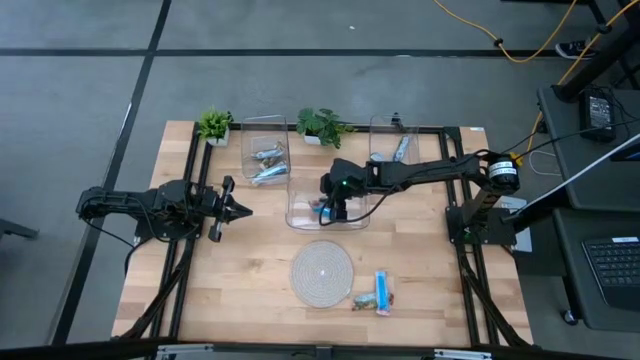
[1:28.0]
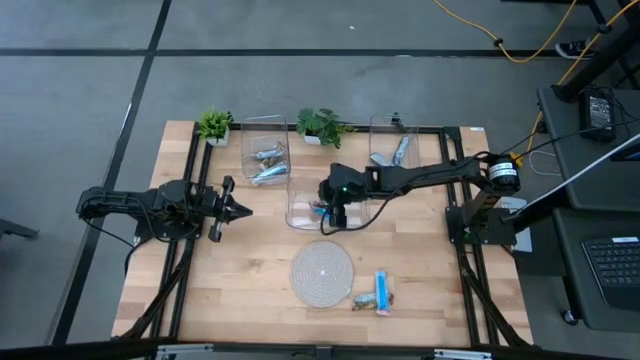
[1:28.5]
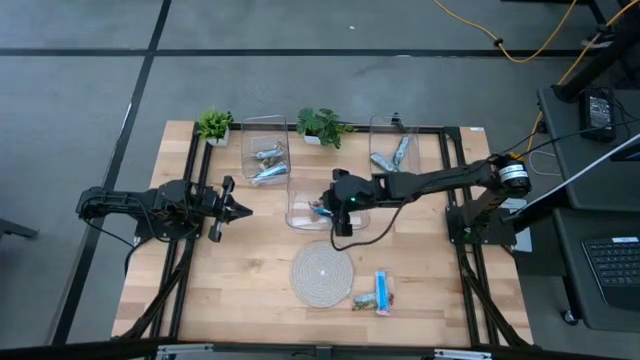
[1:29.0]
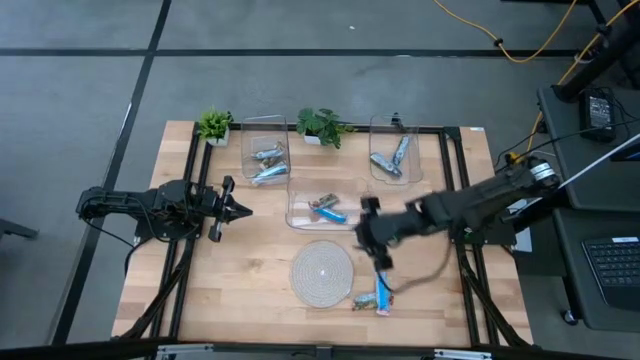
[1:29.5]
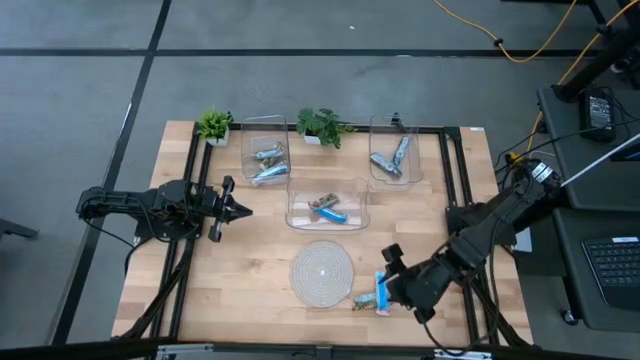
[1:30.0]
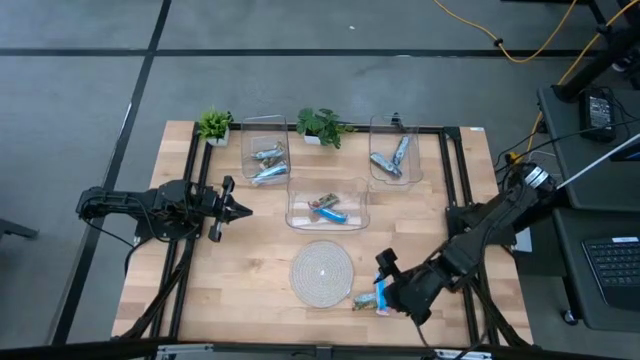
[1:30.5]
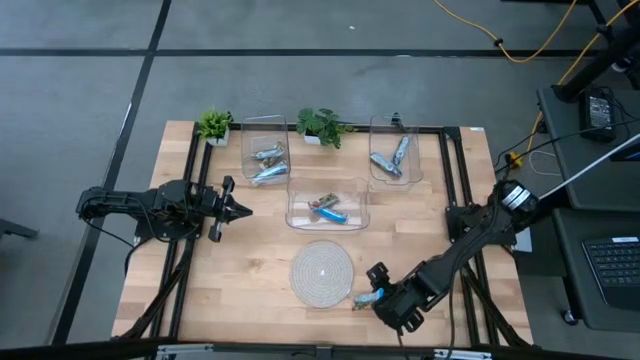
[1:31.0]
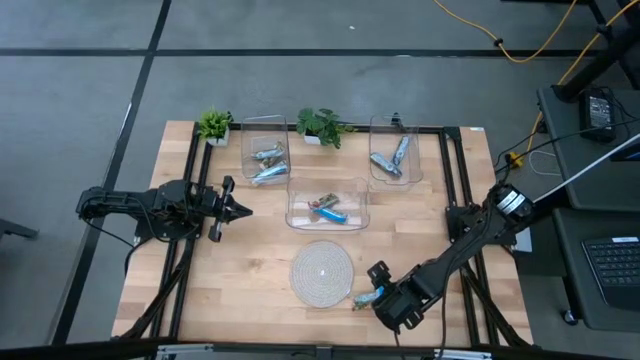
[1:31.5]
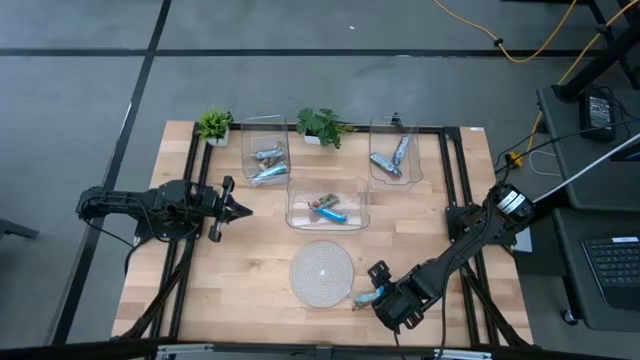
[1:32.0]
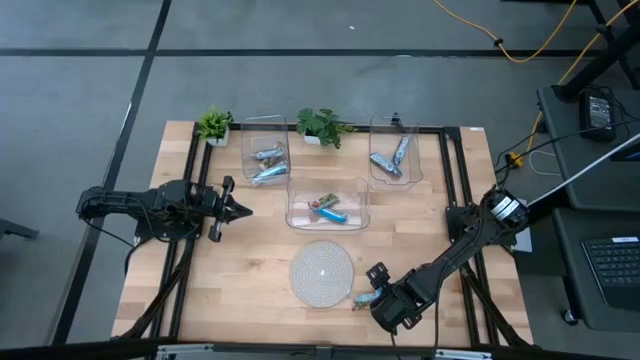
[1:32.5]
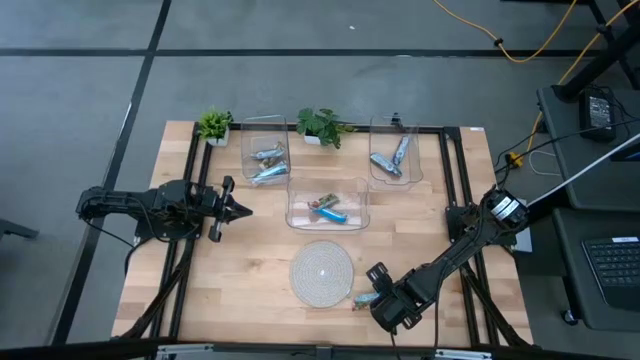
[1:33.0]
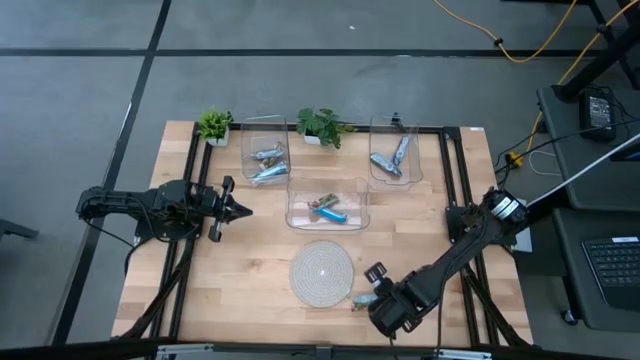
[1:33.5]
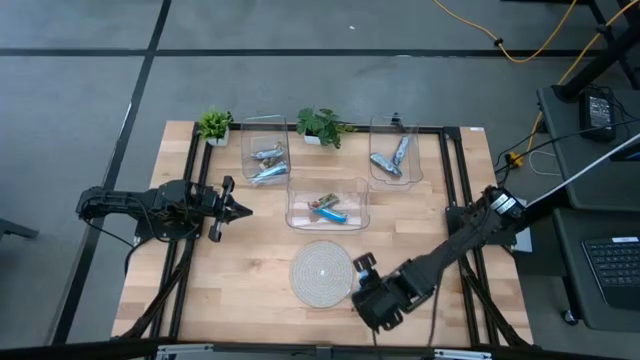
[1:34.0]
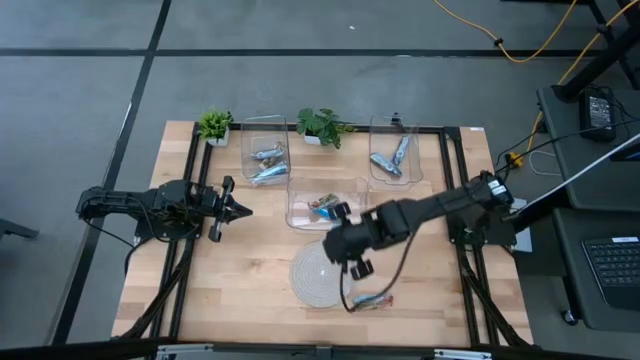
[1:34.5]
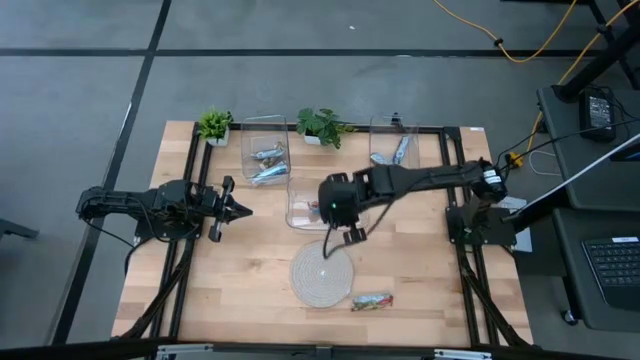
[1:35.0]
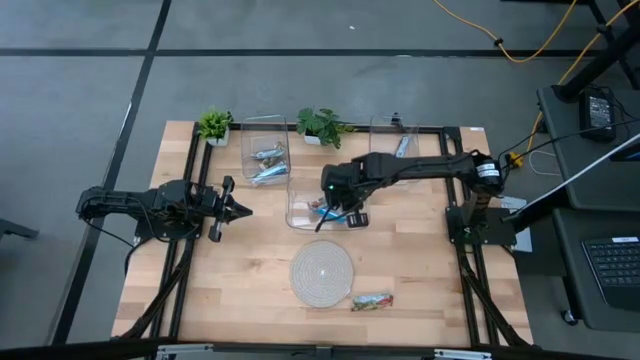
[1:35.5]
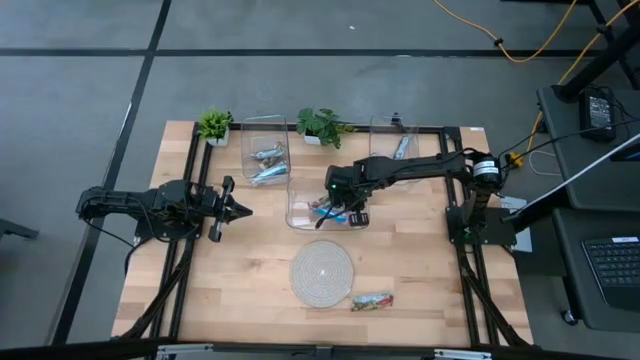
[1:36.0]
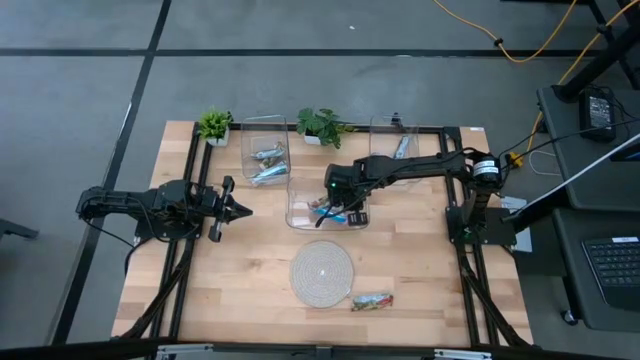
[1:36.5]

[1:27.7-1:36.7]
Task: Pick and place Granola Bars by type
Put the red granola bar into the bottom transparent bin

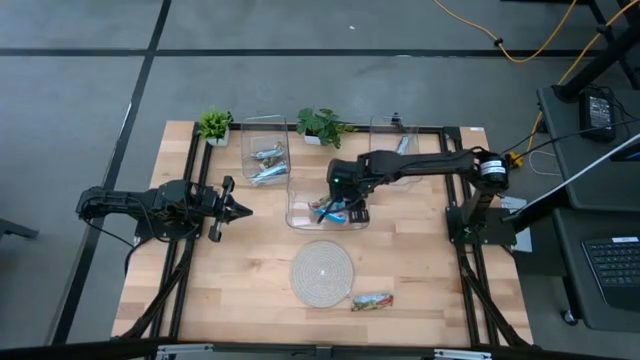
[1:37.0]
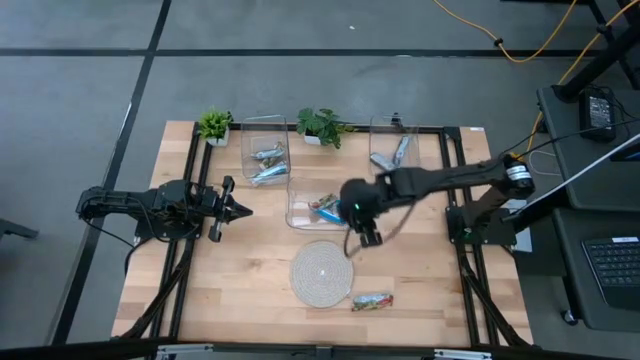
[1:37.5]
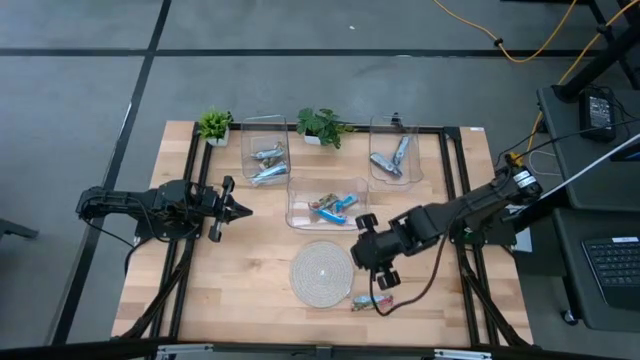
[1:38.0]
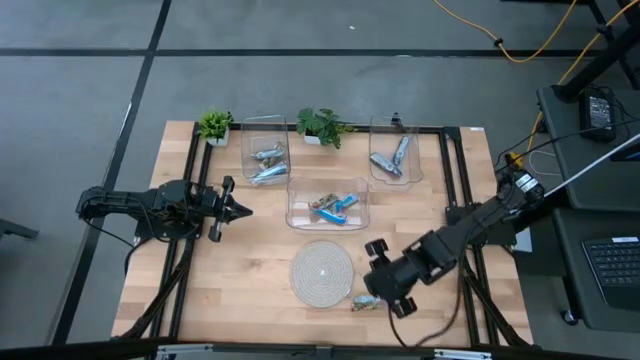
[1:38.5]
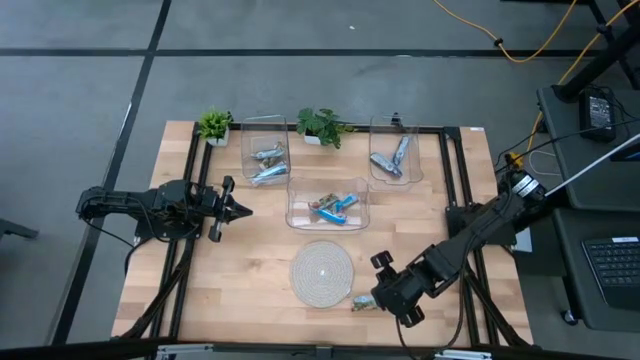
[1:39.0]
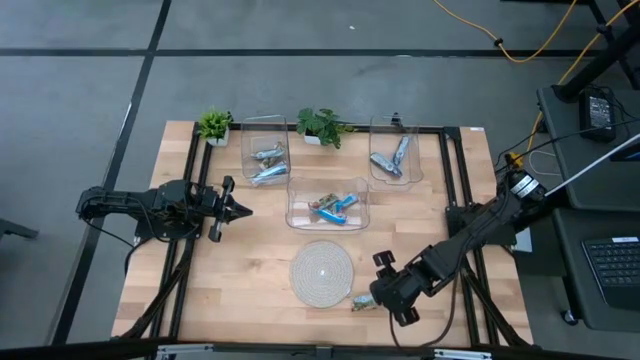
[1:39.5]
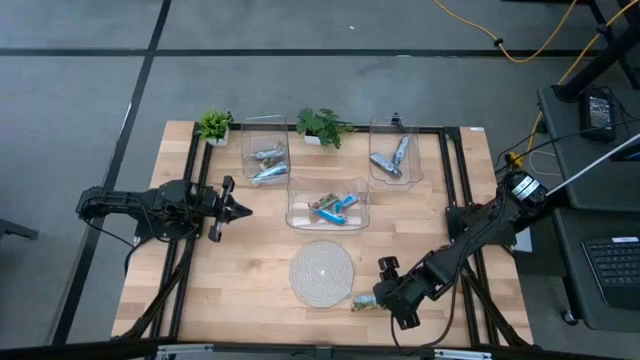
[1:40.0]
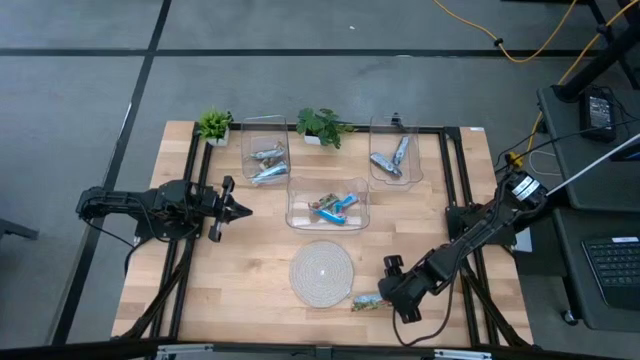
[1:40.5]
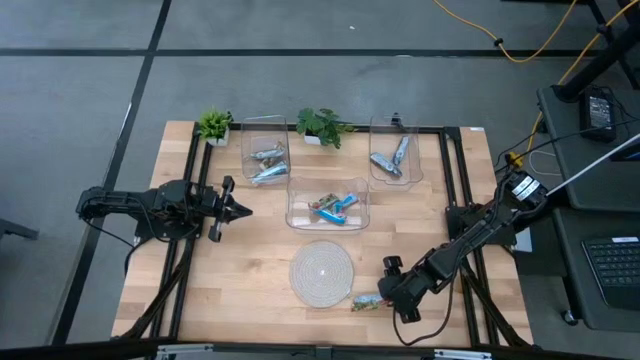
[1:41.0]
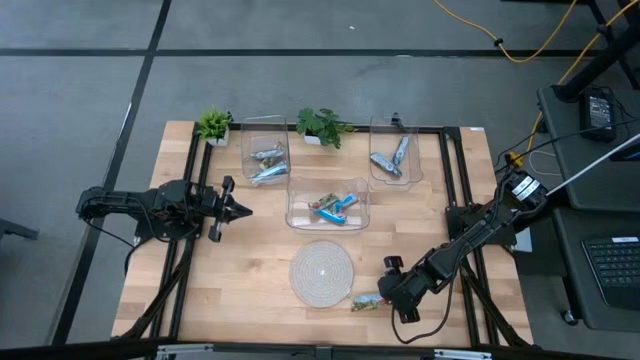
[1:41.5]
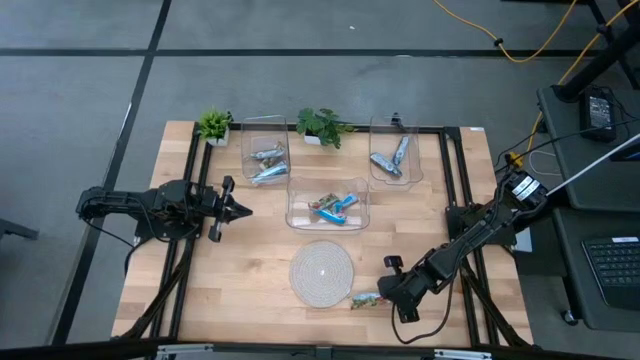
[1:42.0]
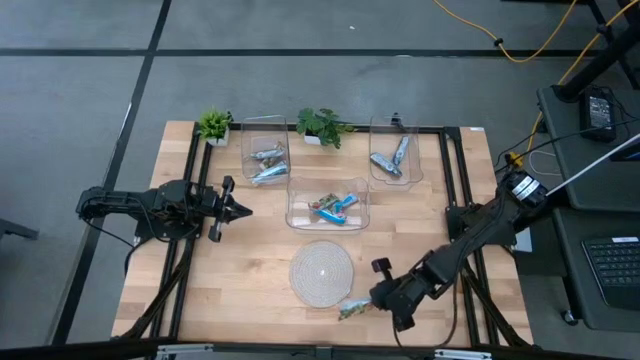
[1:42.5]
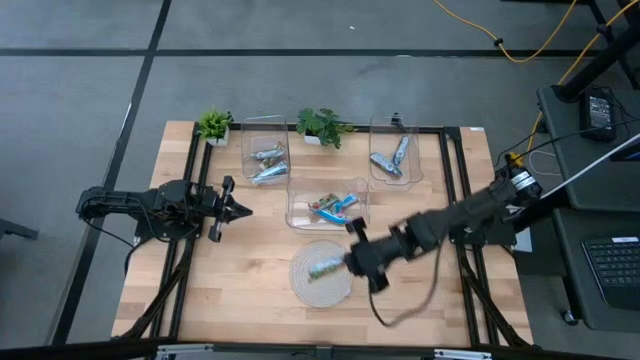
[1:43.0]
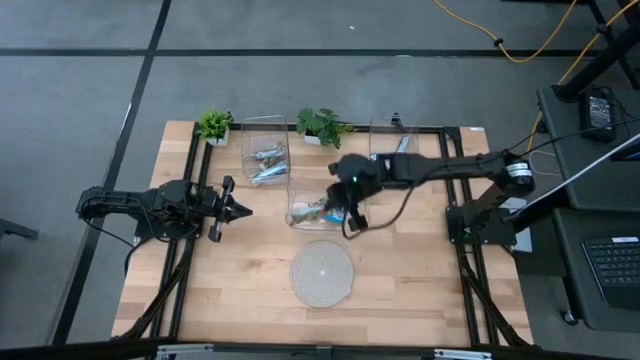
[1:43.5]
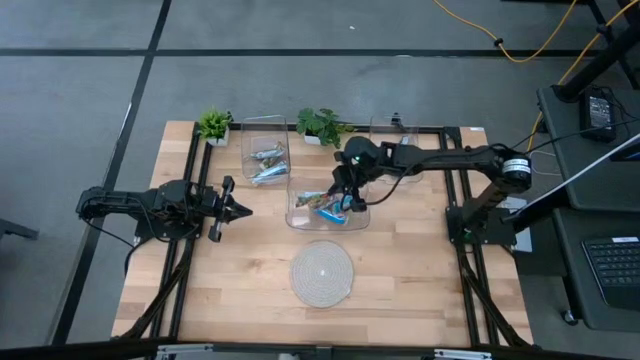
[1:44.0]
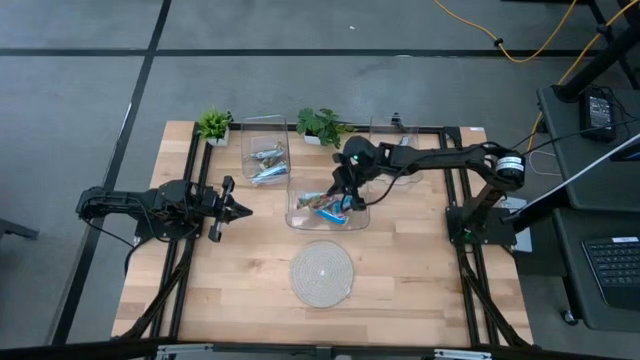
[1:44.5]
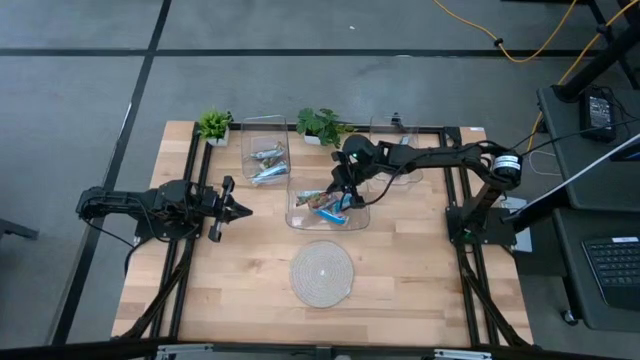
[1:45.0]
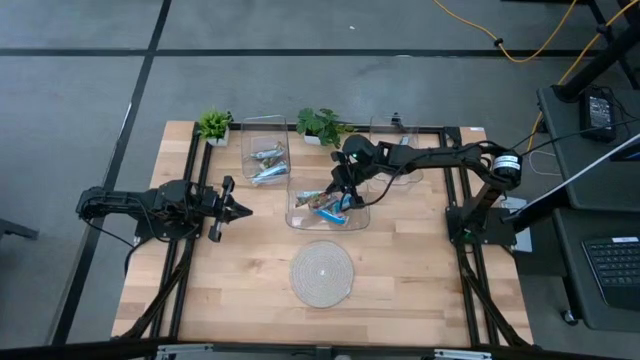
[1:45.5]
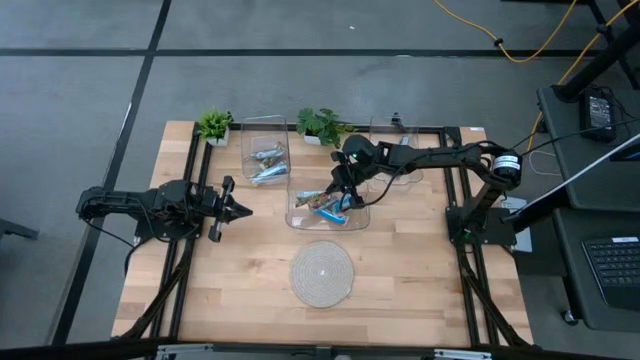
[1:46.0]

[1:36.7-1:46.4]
Put the red granola bar into the bottom transparent bin

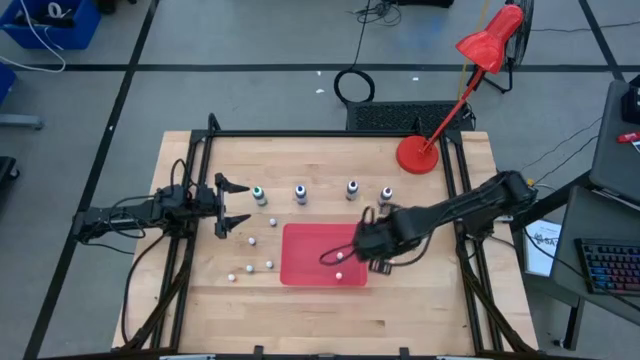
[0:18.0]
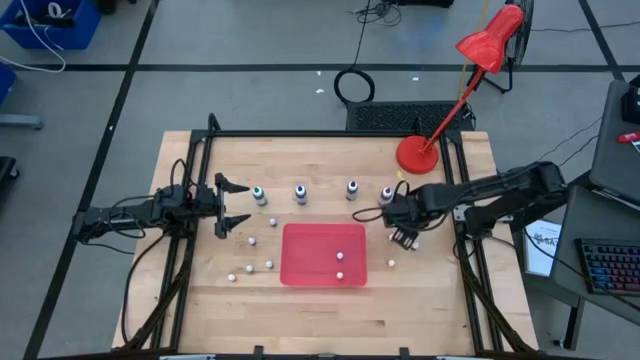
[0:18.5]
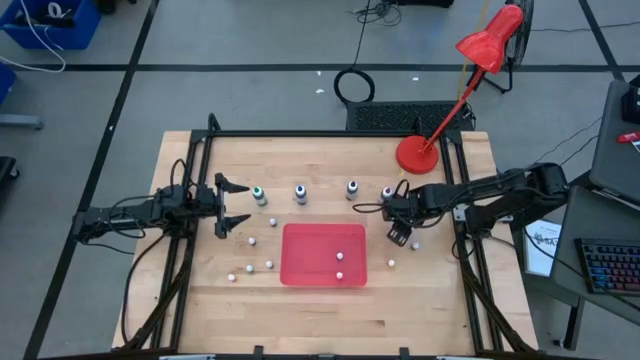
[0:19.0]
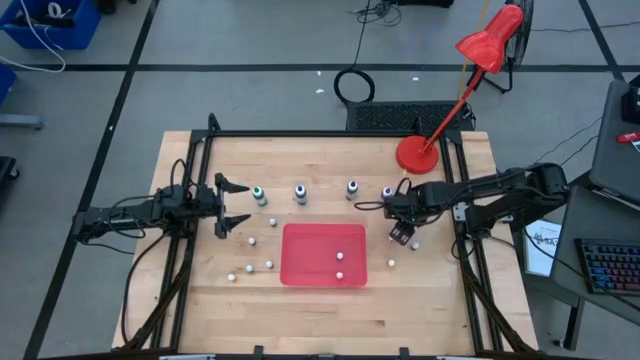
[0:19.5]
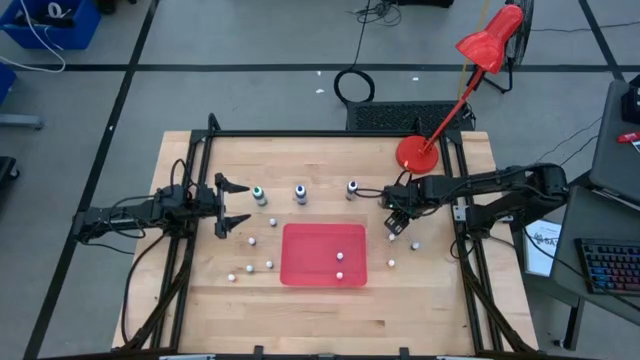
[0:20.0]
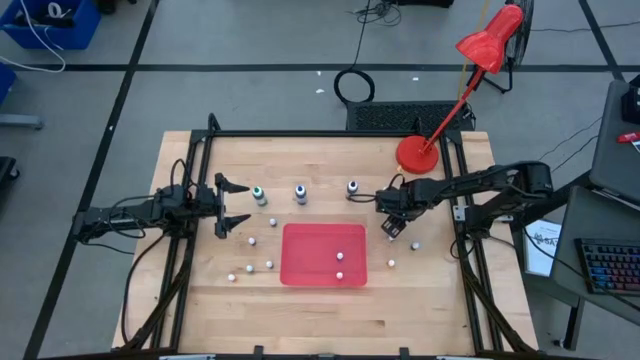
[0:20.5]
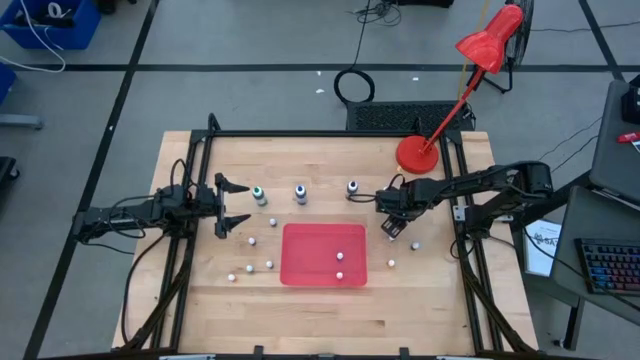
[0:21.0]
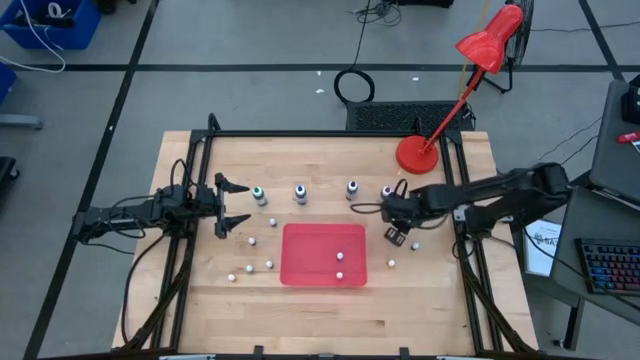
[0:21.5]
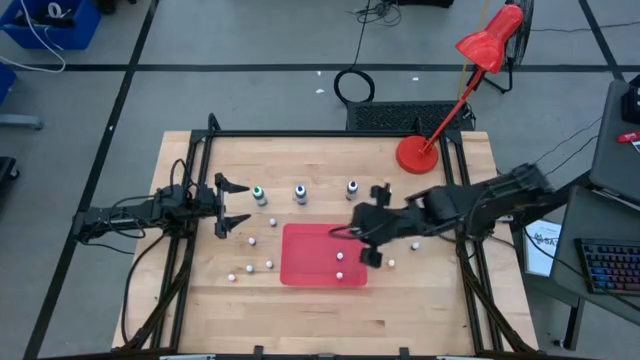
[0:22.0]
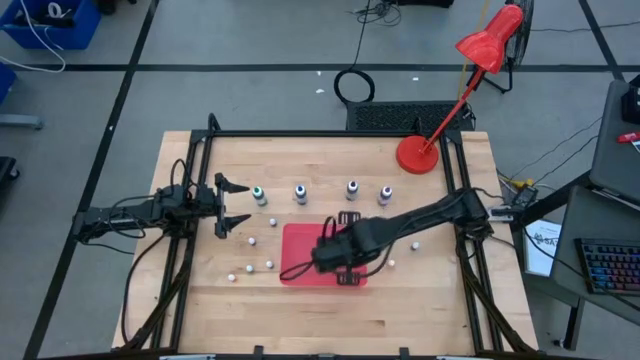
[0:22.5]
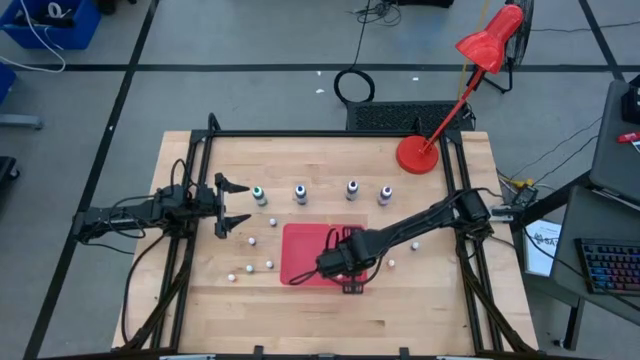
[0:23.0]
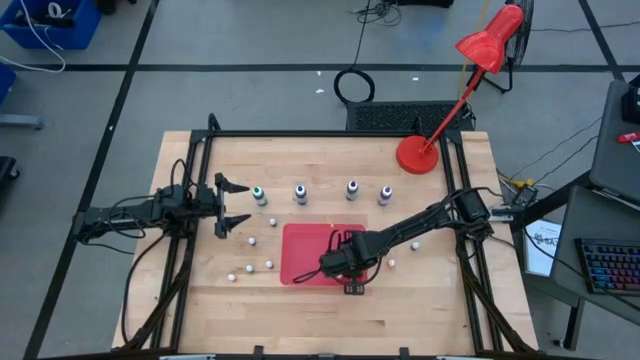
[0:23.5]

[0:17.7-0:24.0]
Task: Pick & Place food coloring
Put the small orange food coloring bottle into the pink bin
